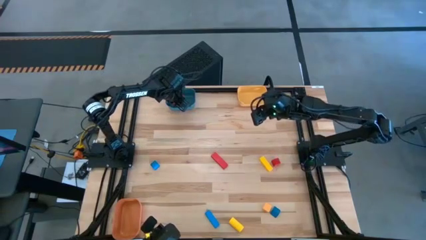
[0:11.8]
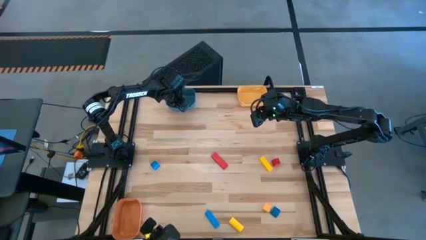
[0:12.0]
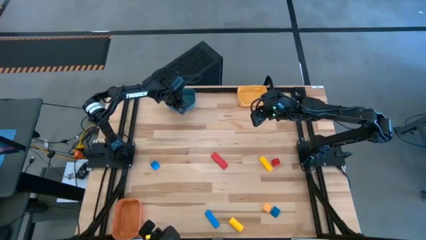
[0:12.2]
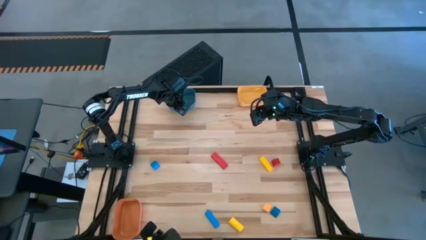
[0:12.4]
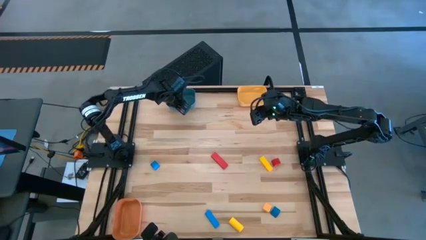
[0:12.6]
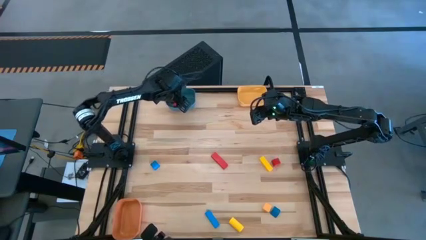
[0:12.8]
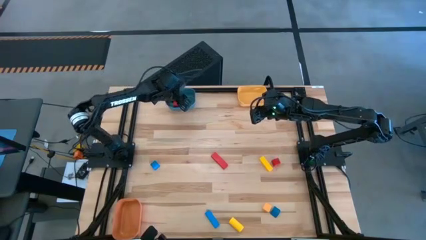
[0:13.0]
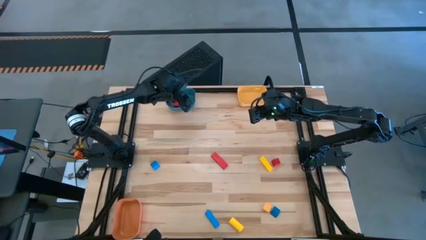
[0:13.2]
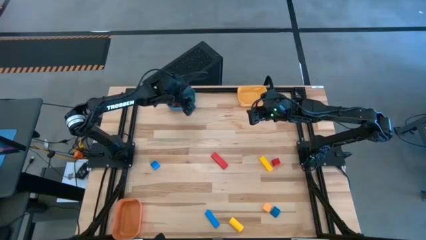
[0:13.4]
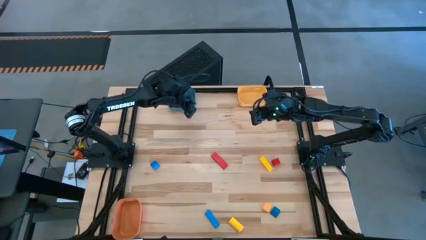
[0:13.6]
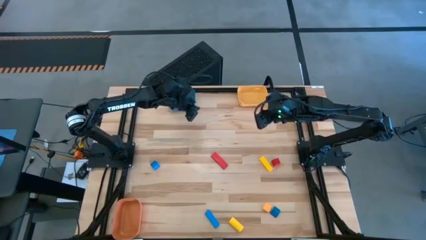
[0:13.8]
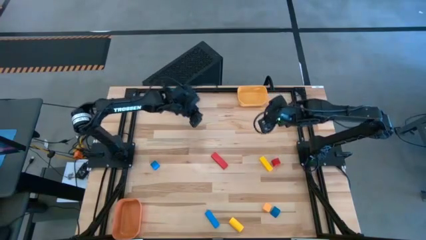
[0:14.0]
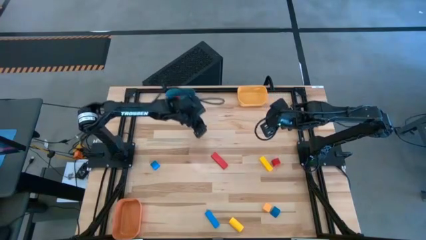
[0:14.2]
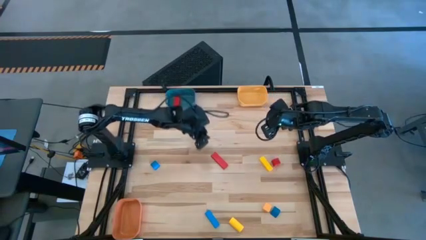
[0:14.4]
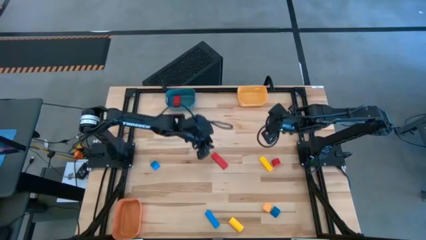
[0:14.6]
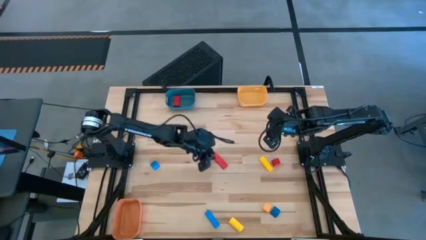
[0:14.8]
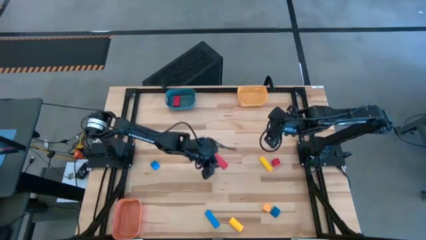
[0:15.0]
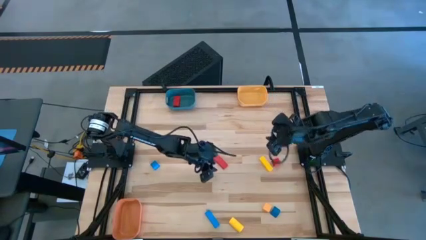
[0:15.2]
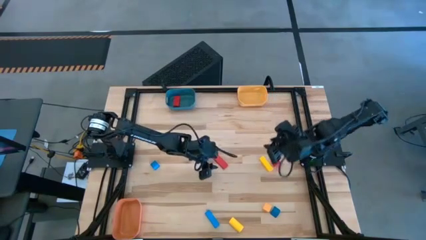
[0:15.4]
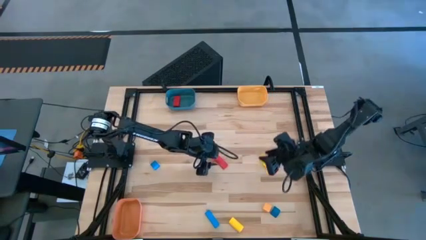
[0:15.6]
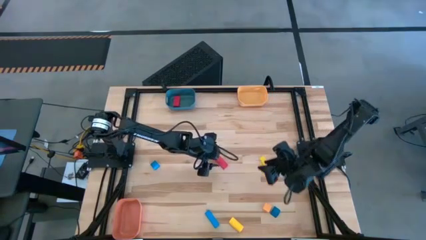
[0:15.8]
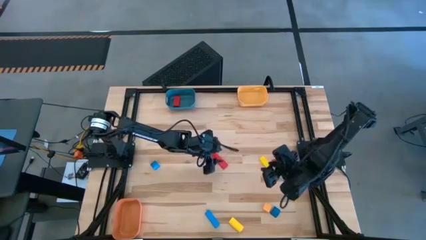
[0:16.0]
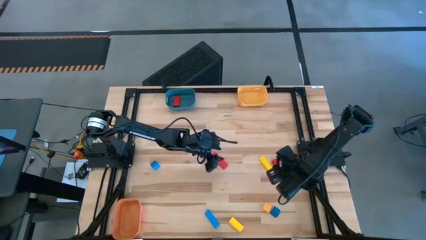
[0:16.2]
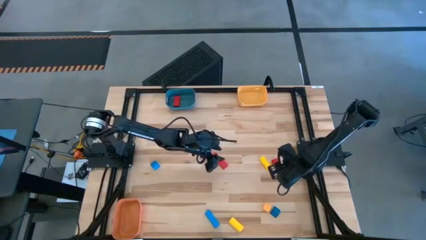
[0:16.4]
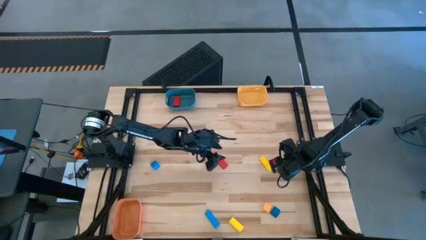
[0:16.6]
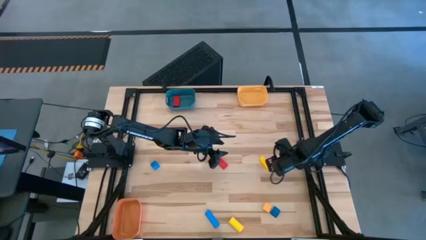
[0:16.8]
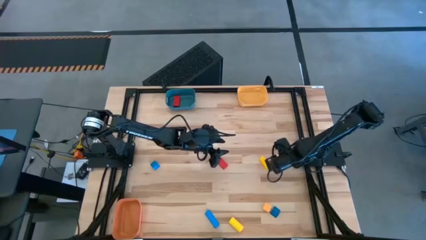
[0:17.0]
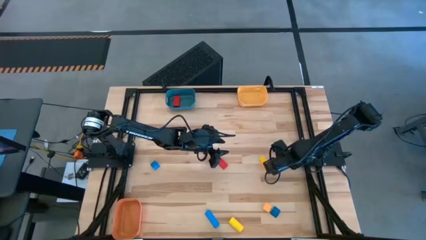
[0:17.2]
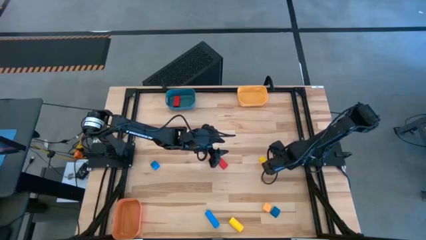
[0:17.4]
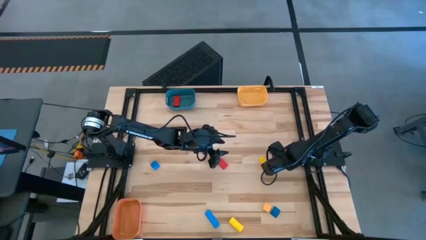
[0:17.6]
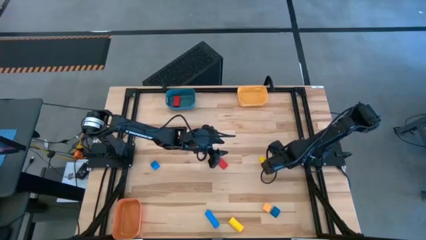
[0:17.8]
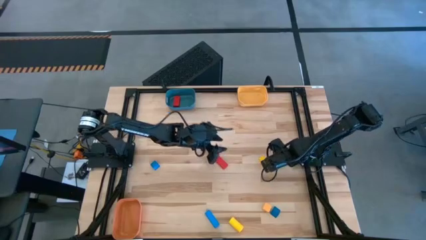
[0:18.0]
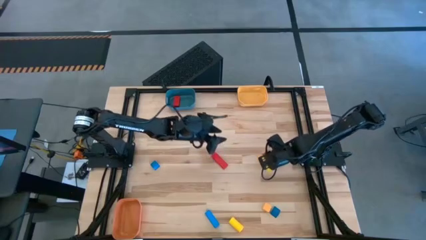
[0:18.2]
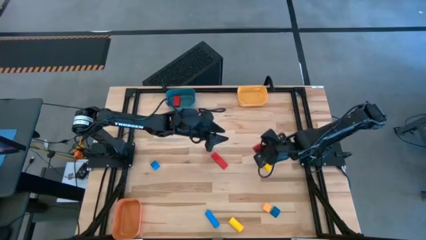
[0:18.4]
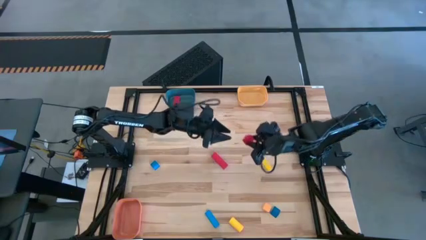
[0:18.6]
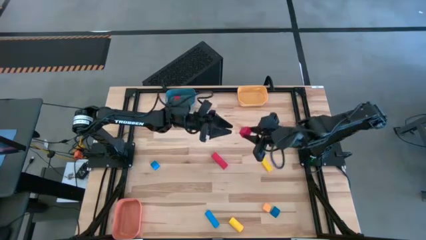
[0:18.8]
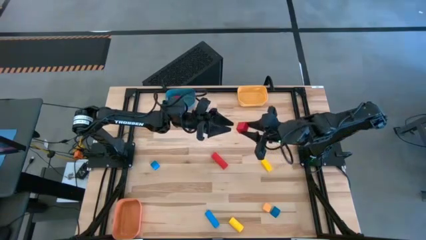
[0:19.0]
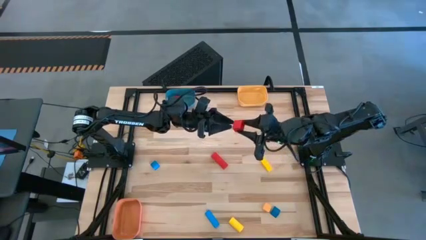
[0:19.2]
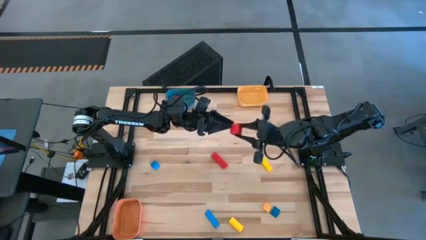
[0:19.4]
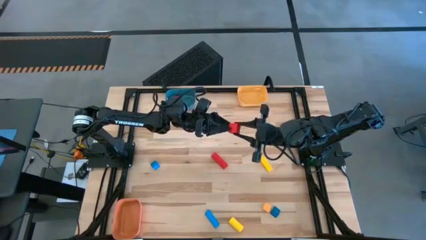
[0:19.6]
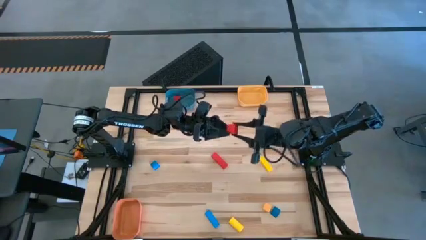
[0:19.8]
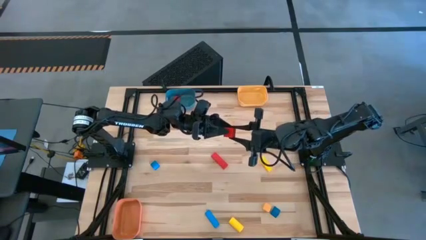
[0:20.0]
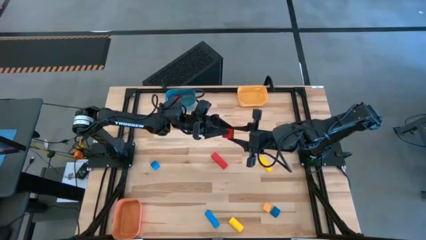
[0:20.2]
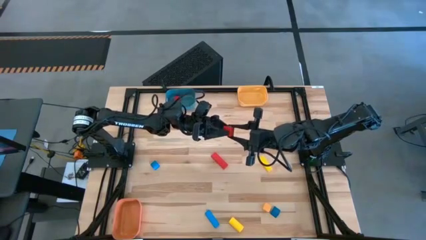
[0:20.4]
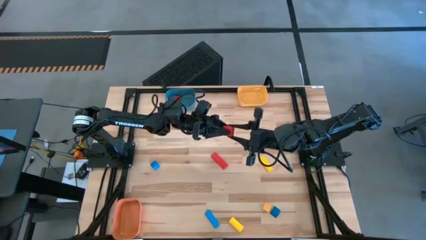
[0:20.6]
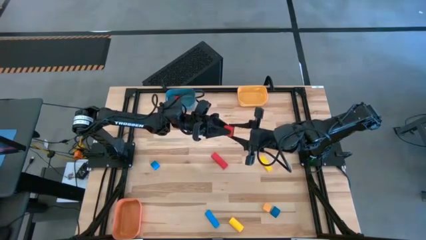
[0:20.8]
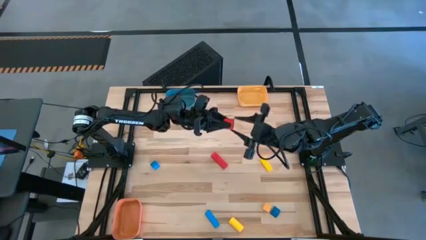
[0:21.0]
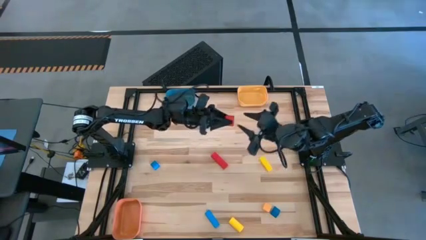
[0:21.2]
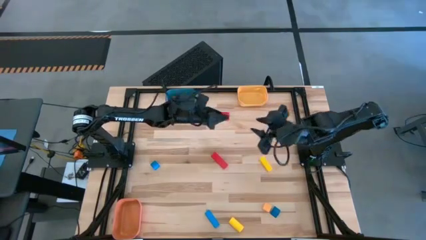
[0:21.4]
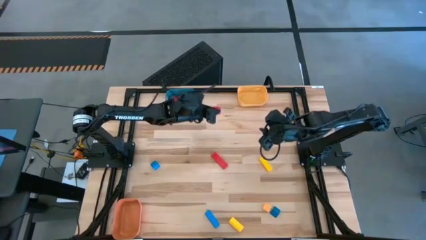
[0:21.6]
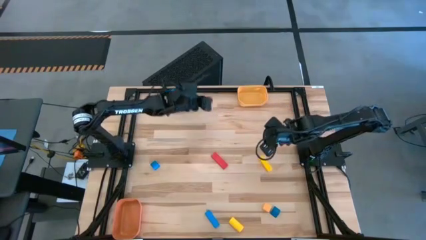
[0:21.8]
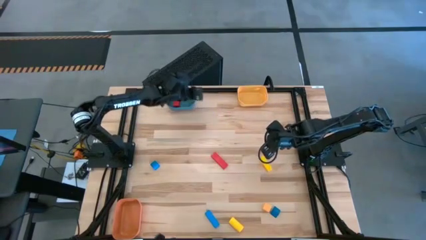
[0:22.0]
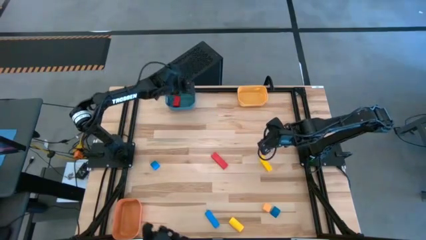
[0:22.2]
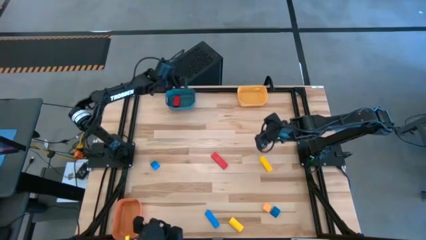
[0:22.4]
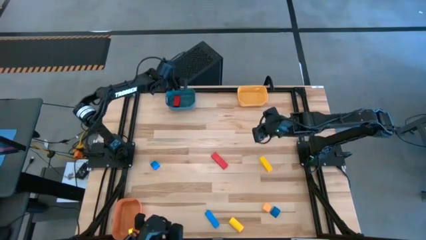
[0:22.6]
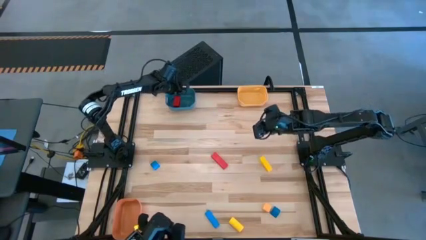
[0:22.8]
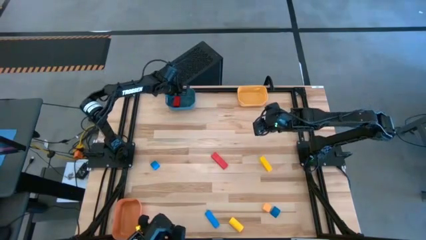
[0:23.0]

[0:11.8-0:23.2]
Task: Sort & place blocks by color
Put the right red block into the blue bin

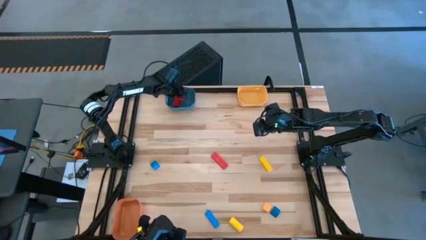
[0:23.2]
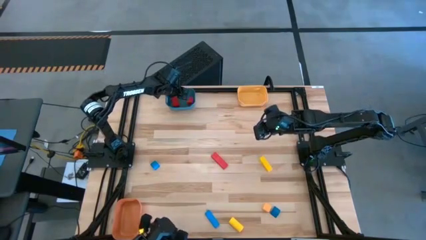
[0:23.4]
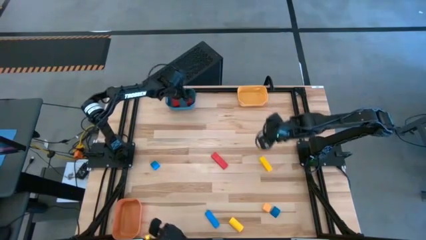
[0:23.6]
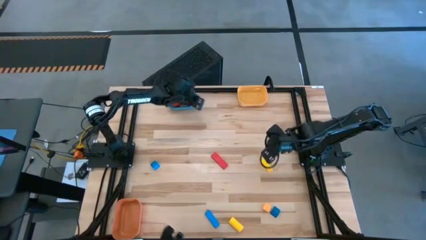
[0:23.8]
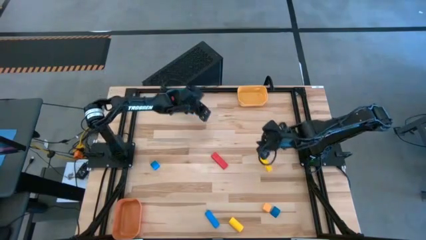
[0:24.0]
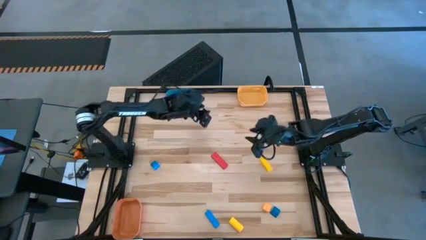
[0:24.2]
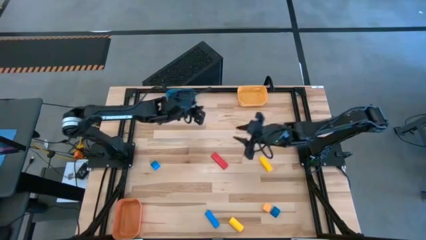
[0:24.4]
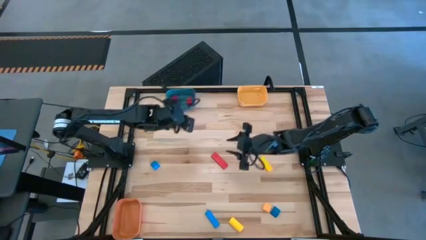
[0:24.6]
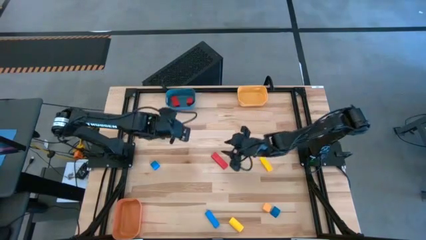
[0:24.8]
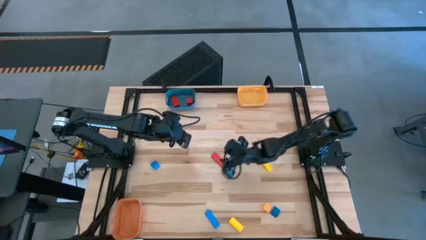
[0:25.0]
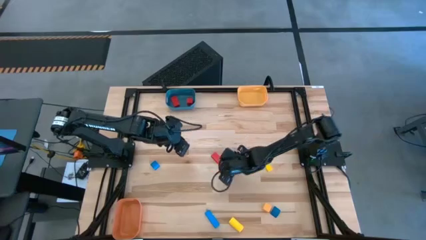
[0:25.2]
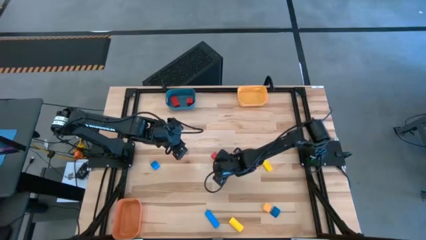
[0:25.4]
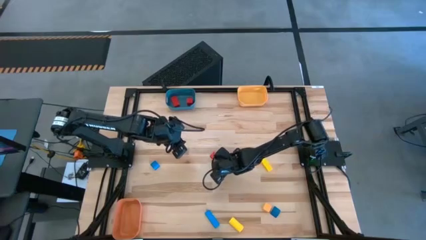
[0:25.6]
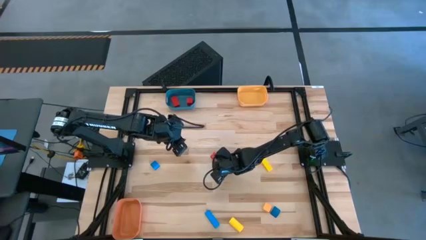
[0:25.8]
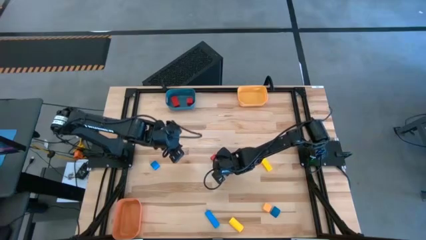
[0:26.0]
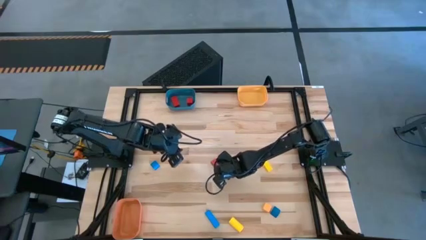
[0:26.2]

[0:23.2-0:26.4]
Put the red block into the blue bin

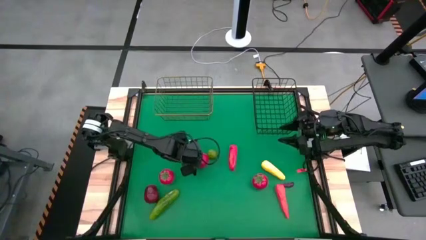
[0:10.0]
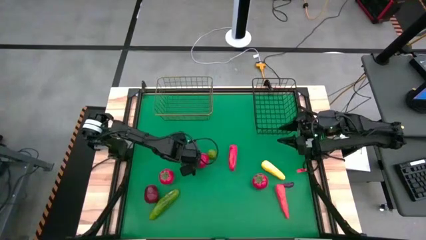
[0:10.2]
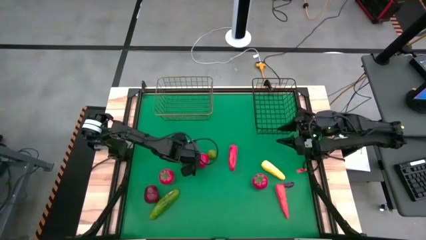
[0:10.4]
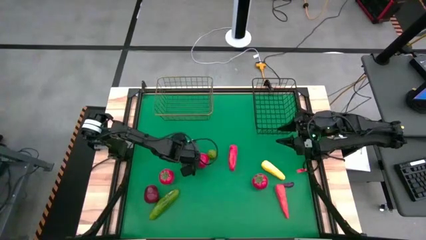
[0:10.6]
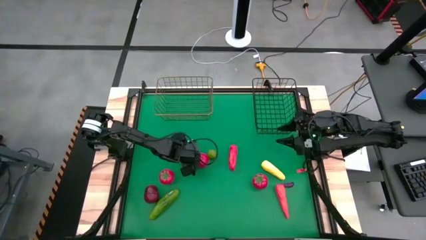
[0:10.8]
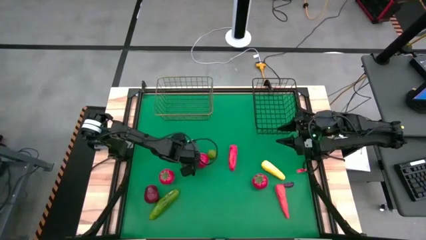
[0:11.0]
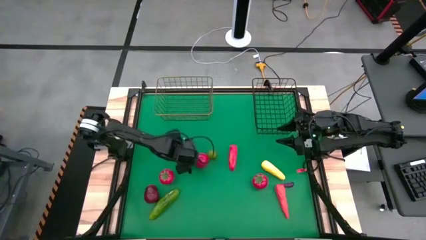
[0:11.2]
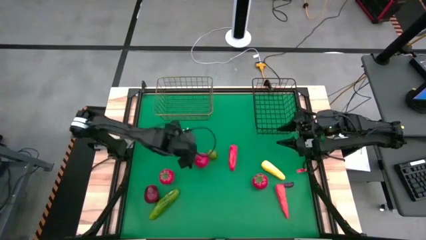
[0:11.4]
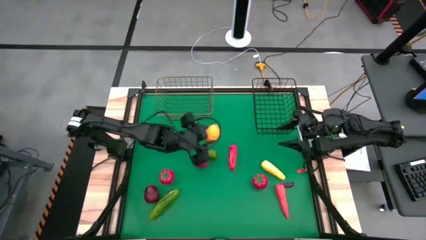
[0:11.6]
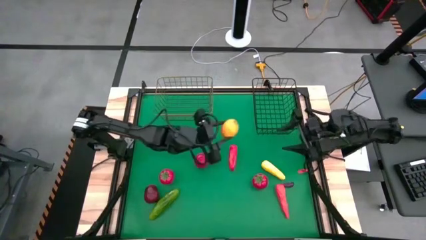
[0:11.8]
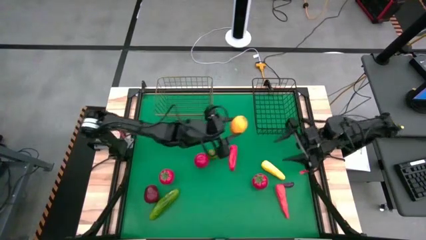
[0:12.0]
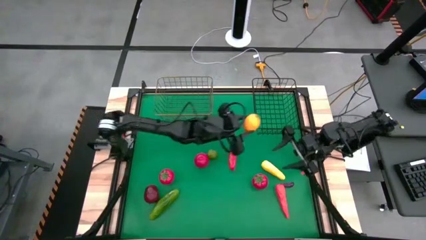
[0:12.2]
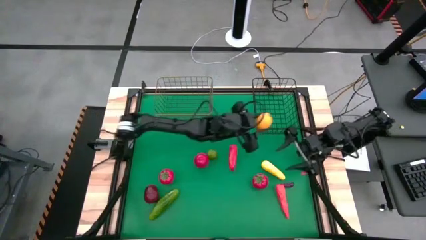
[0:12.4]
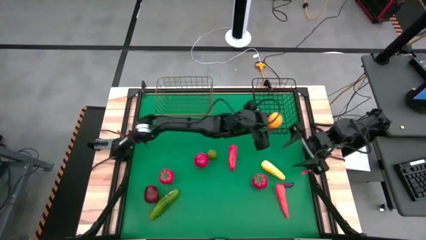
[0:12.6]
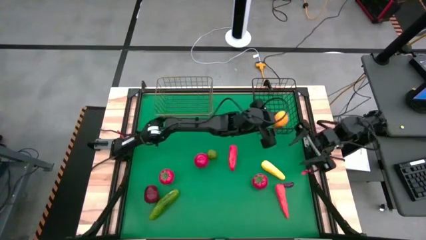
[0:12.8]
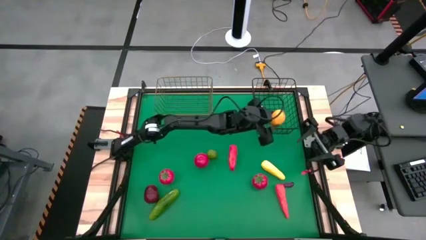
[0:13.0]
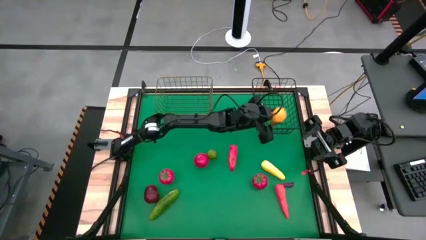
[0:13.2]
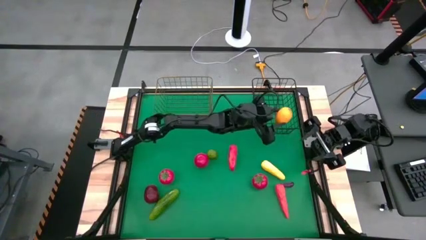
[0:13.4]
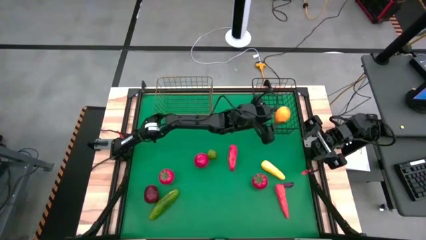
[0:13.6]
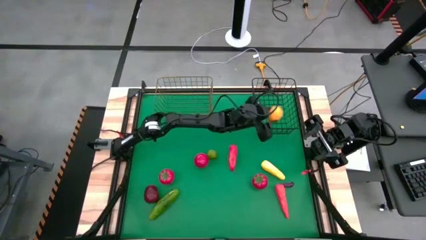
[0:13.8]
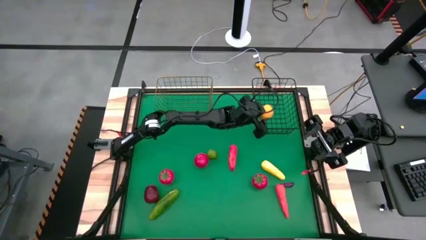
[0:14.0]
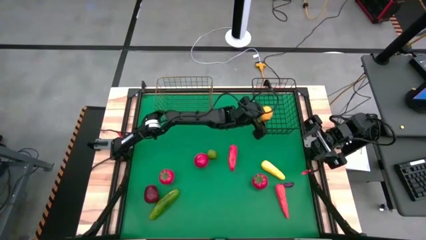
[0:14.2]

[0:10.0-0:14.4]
Task: Sort produce into baskets
Put the yellow lemon into the black wire basket
